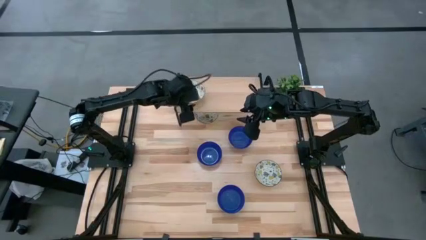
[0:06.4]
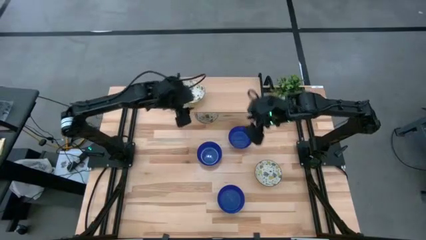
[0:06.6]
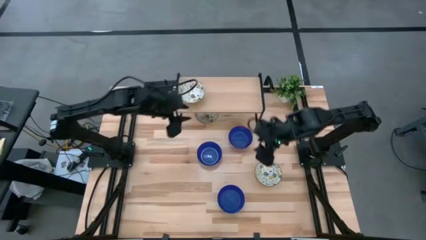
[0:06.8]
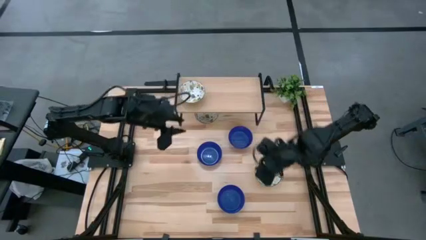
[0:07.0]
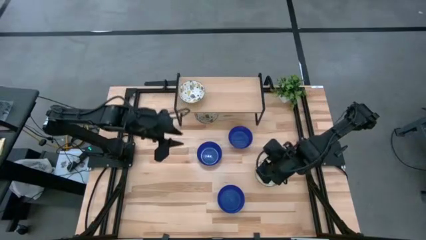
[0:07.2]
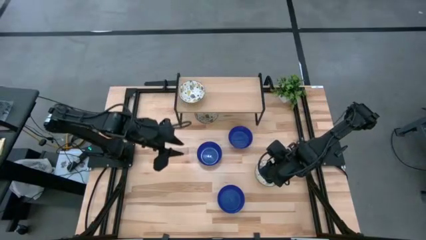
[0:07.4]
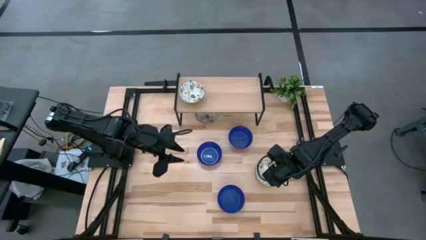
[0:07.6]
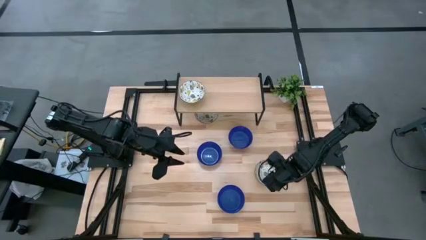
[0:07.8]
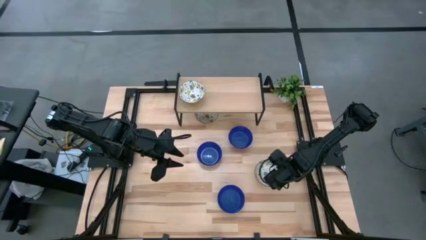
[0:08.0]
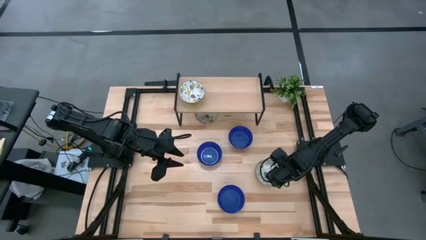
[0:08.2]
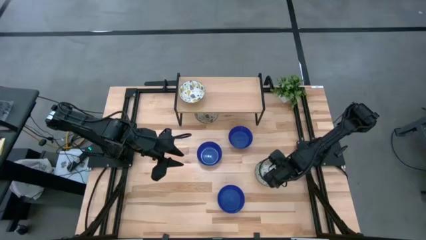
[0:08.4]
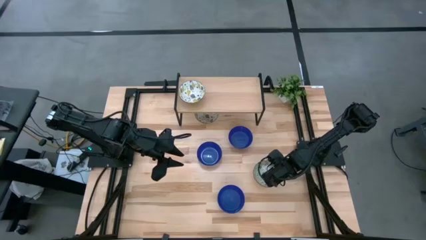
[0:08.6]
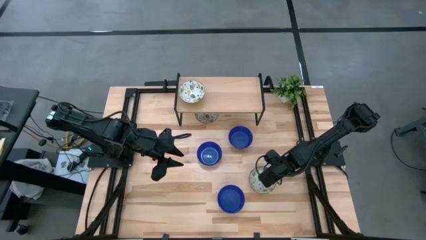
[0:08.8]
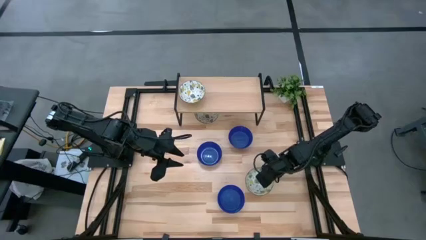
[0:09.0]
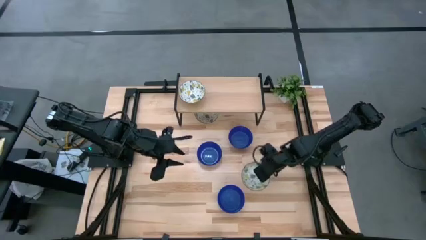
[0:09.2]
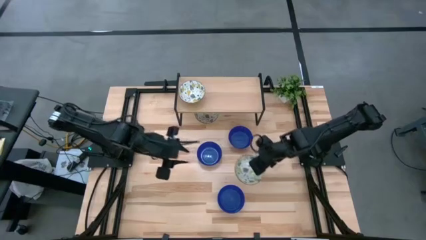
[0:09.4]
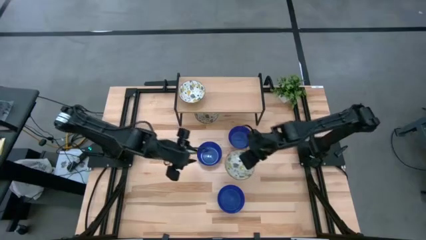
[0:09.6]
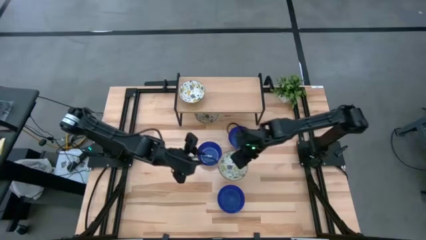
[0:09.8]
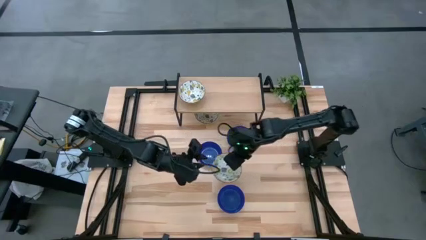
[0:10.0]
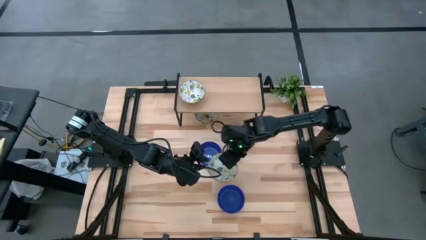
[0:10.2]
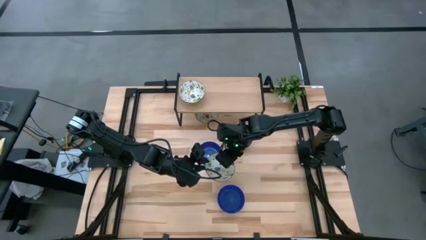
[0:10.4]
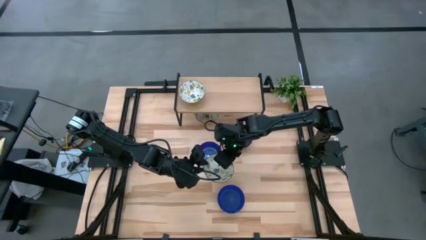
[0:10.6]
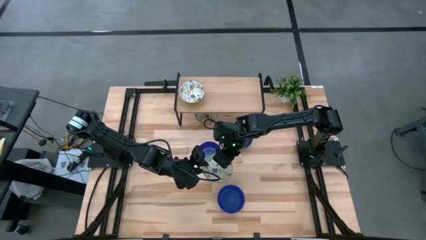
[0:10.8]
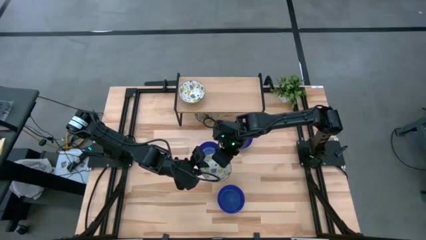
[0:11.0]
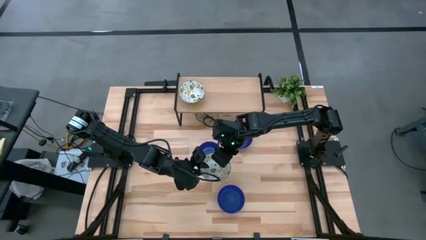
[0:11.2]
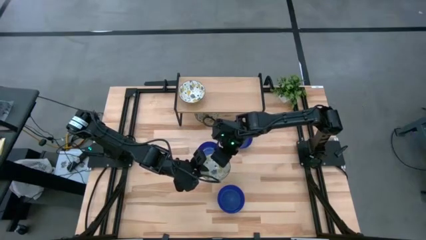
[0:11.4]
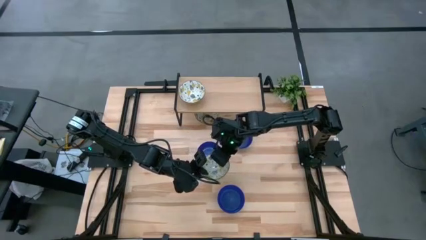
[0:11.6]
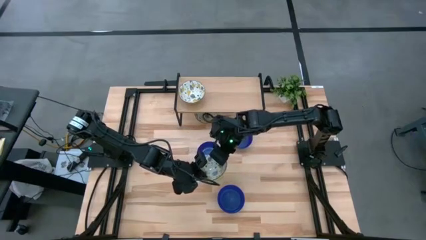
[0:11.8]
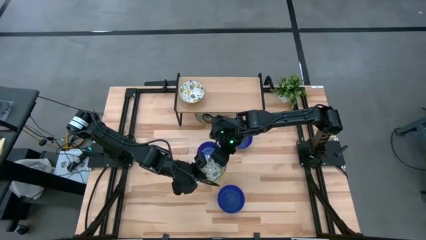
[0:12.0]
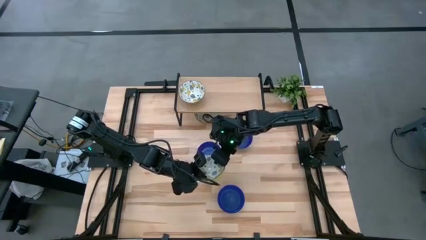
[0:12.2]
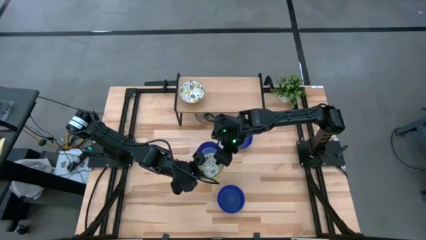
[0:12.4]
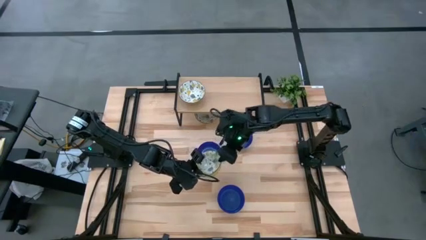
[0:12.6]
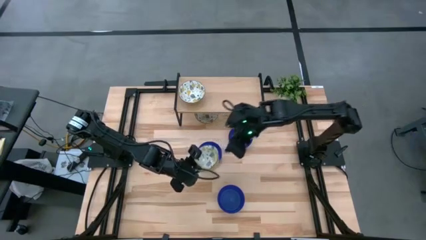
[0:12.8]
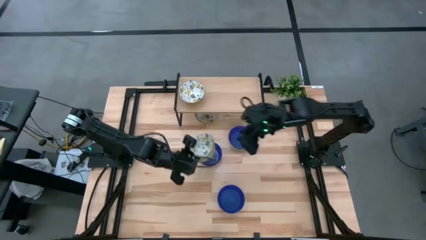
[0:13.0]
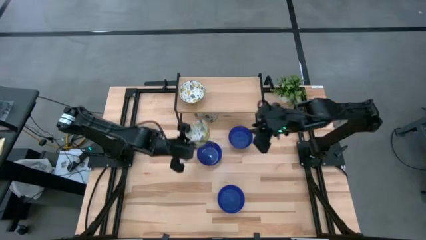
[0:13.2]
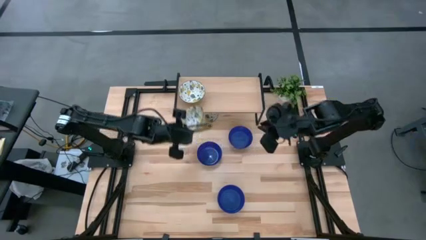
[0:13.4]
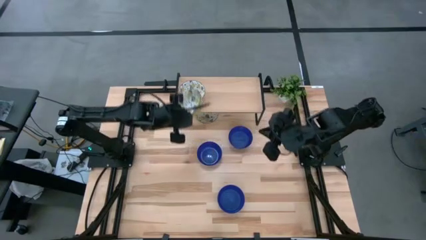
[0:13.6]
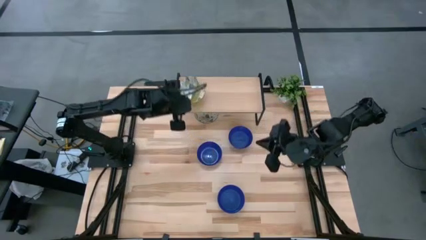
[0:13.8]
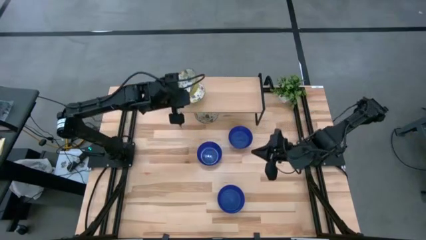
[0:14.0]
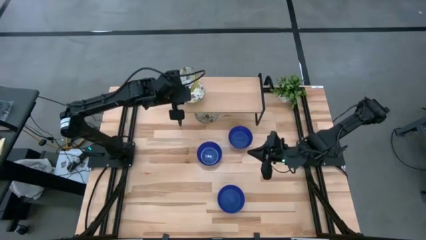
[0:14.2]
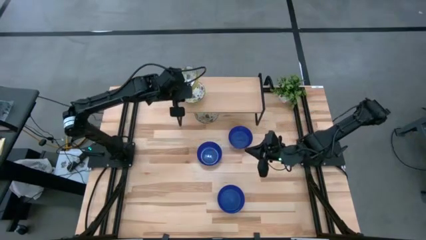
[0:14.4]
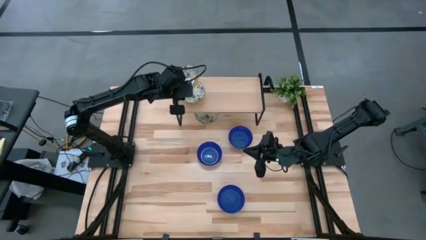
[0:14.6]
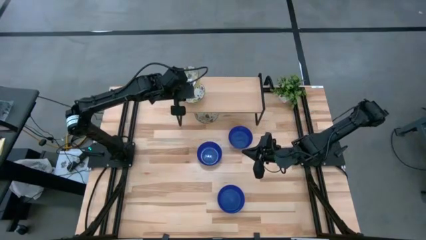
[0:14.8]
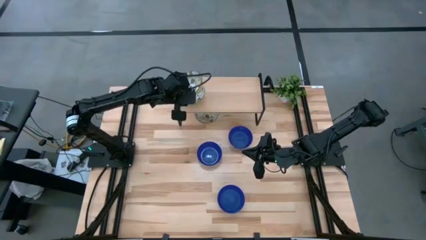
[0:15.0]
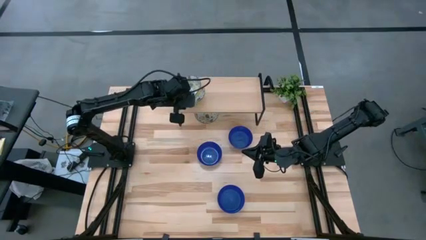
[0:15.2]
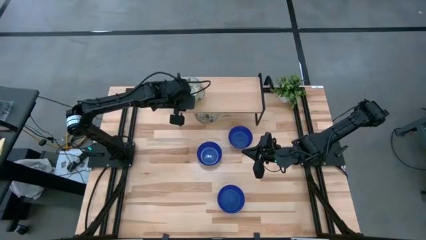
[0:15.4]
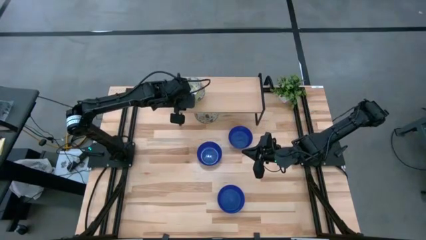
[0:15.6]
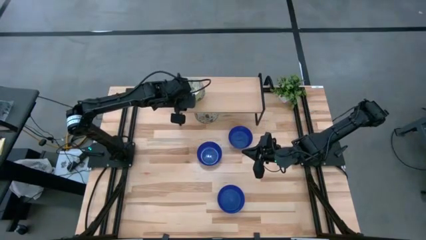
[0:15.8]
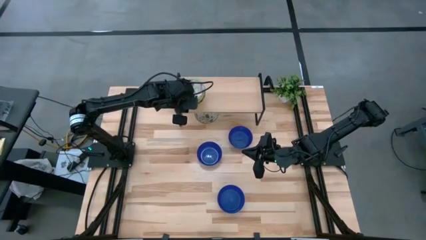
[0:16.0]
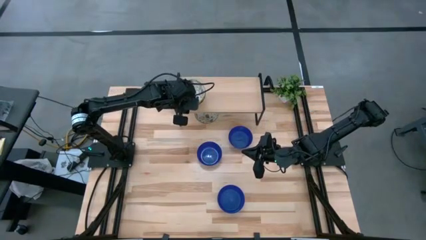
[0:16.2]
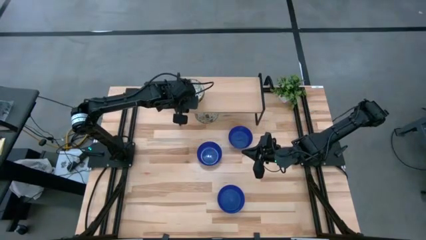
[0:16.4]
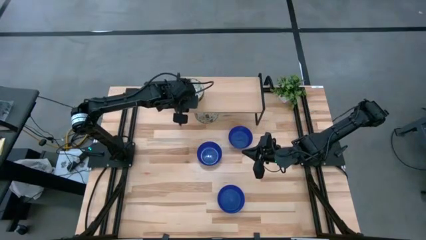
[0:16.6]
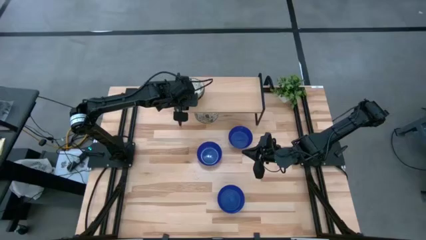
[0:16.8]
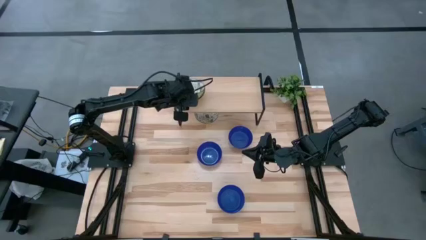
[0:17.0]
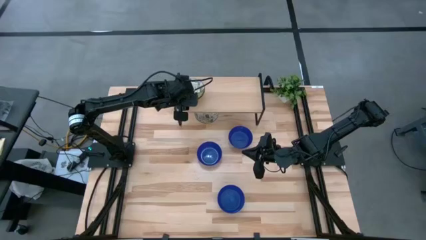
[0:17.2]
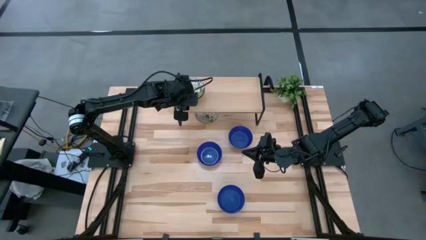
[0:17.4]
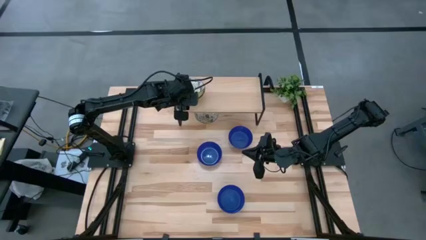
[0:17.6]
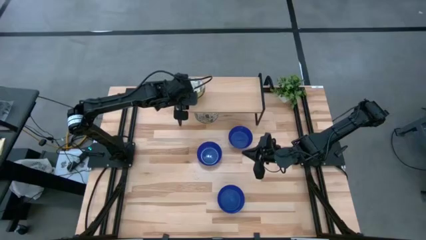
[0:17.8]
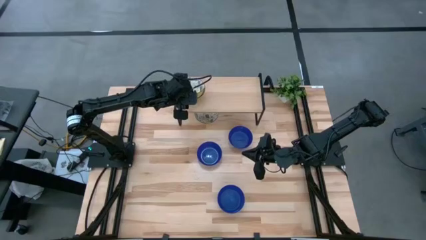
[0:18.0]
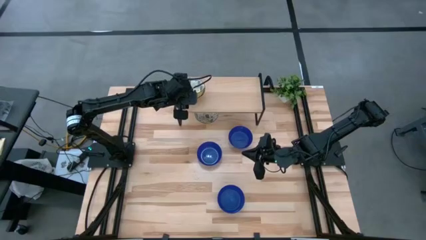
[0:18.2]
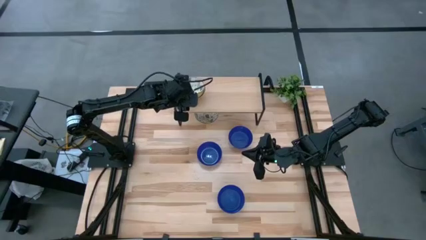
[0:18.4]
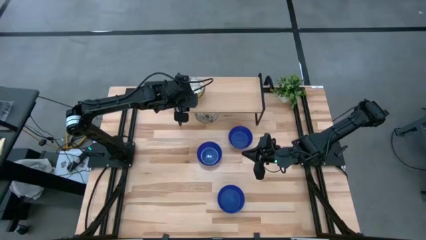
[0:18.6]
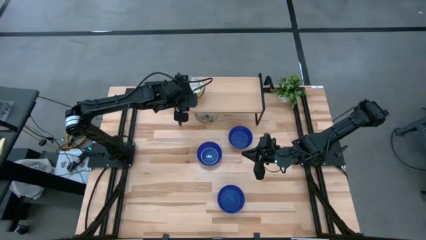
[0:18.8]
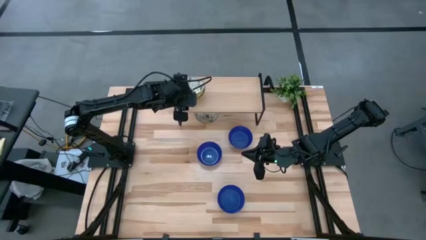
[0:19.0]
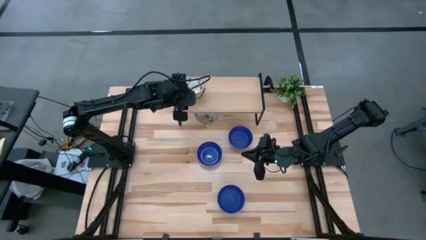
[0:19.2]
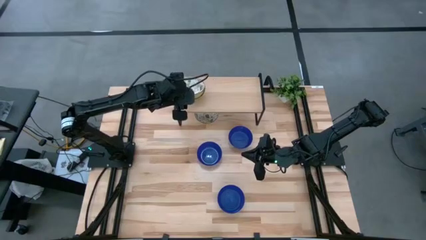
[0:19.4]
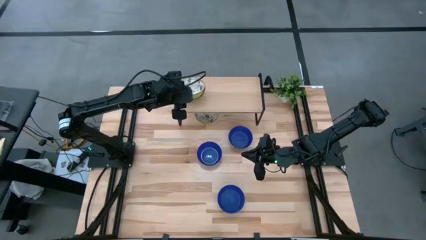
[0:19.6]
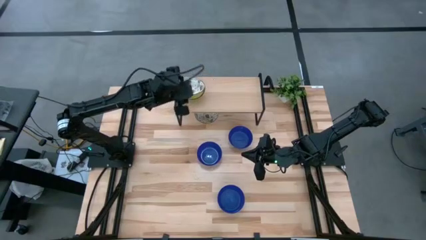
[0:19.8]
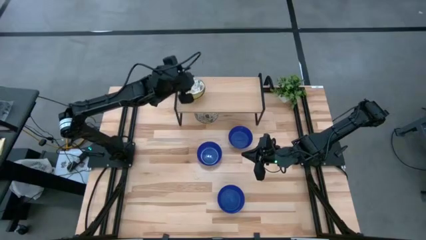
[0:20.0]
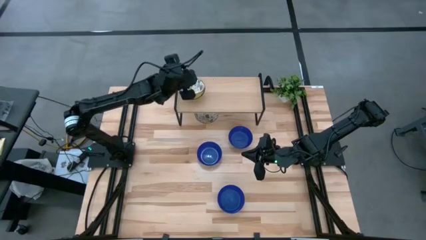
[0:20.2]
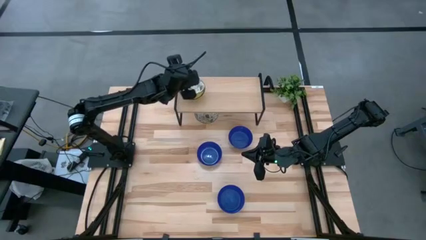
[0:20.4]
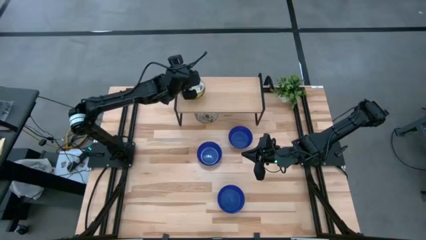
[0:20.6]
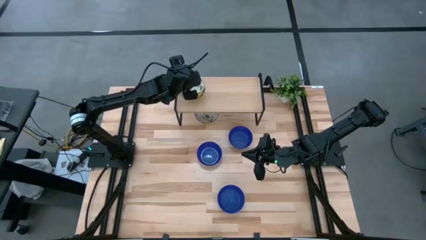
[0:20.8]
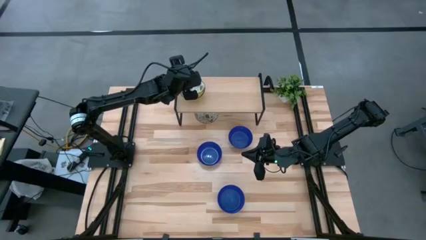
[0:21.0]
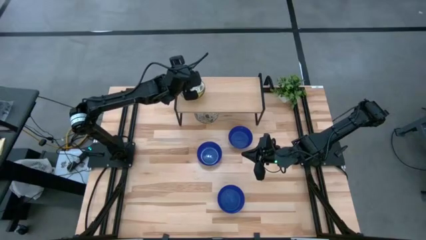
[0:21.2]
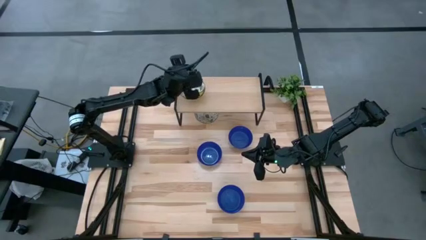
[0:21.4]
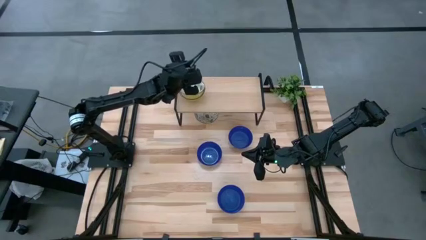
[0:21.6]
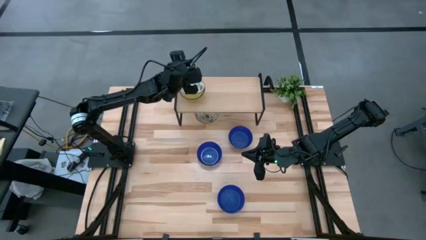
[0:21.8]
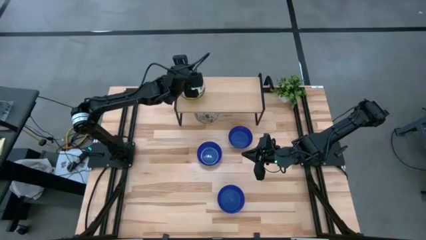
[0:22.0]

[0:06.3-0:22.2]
Task: Pick & Place Mini bowls
Stack the bottom white bowl on top of the white bowl on the shelf

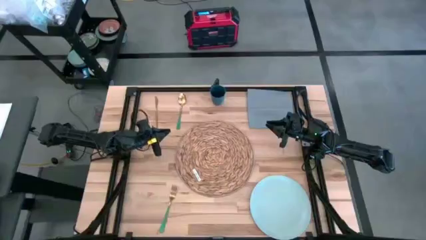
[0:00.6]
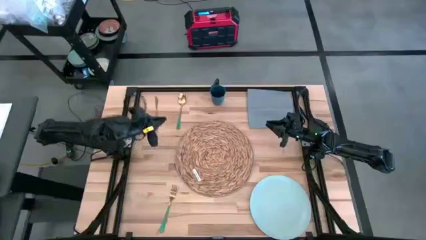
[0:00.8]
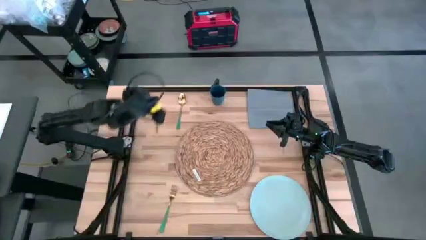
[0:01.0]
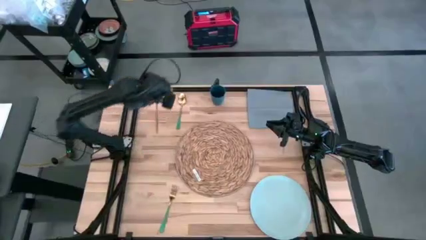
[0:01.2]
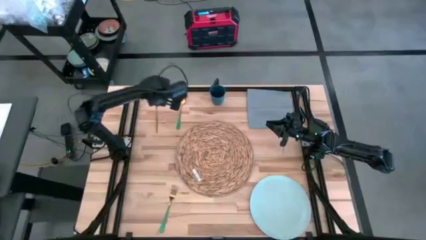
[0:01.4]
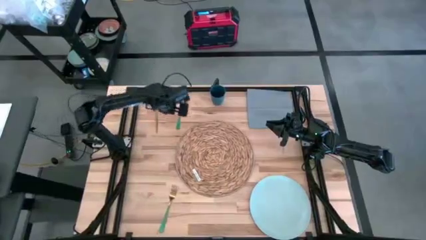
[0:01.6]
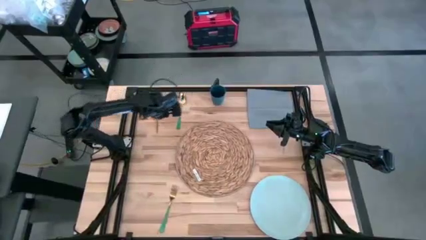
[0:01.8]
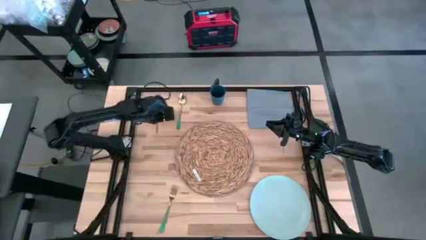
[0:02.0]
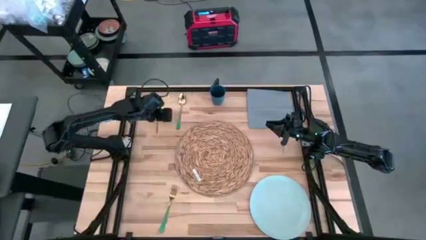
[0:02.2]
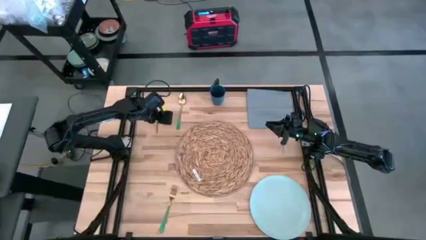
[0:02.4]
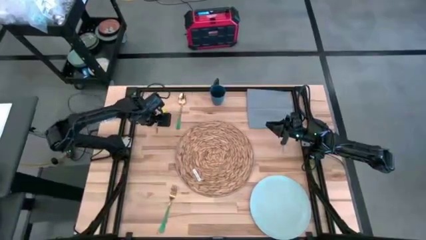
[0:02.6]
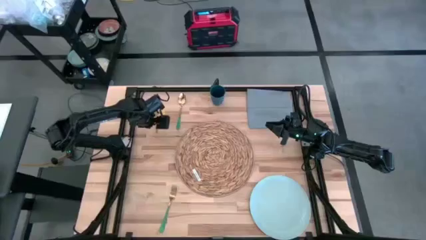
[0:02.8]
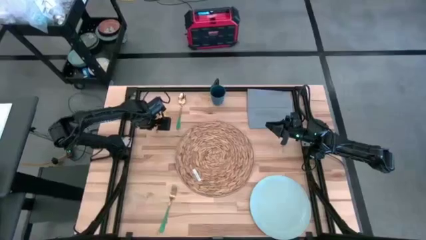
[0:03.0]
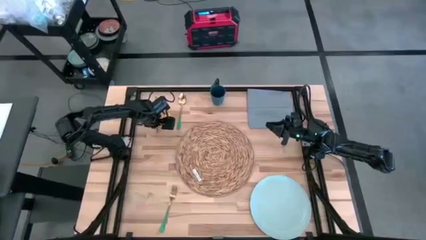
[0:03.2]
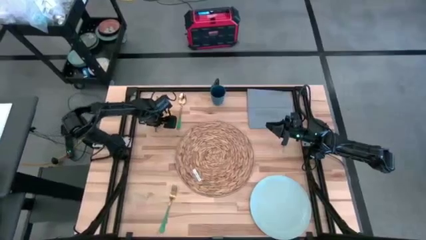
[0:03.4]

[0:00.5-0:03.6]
Task: Set table place
Put the gold table knife on the brown tablemat
